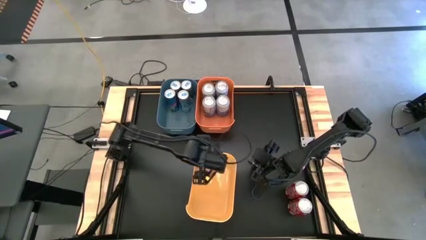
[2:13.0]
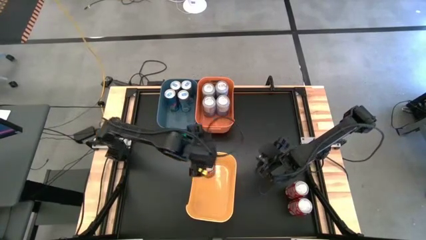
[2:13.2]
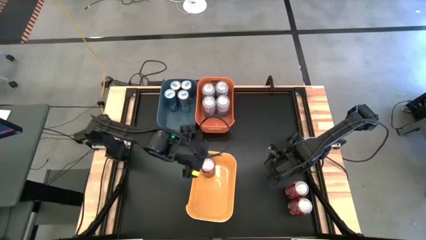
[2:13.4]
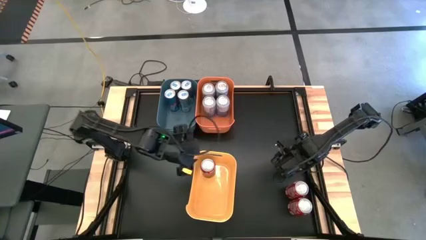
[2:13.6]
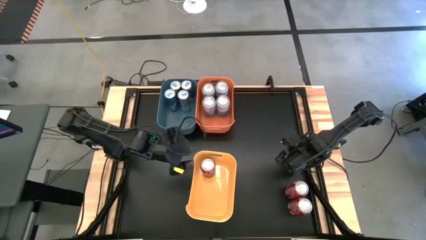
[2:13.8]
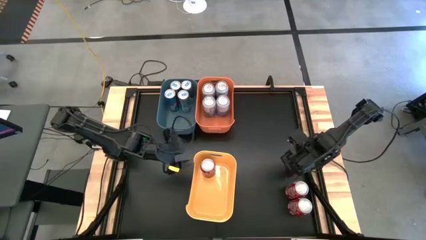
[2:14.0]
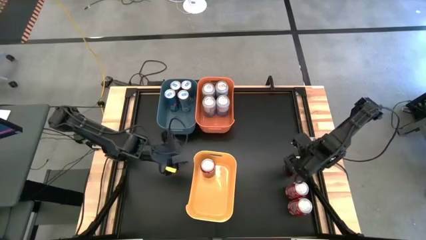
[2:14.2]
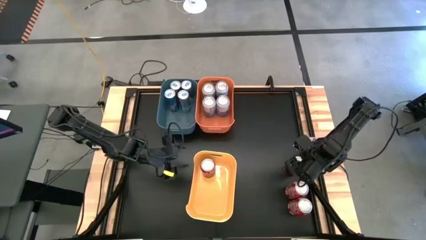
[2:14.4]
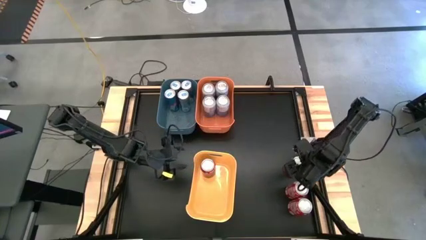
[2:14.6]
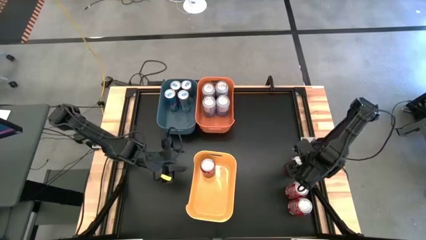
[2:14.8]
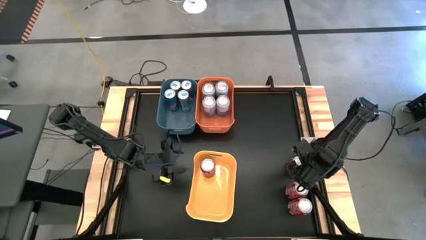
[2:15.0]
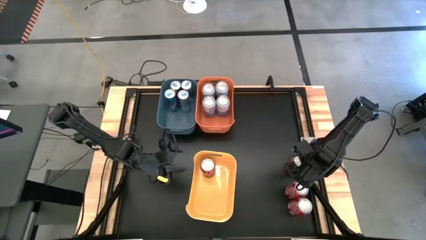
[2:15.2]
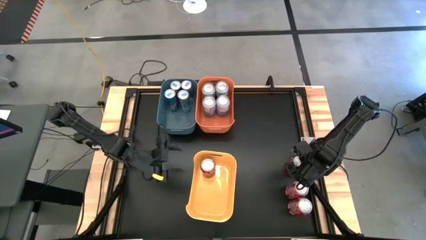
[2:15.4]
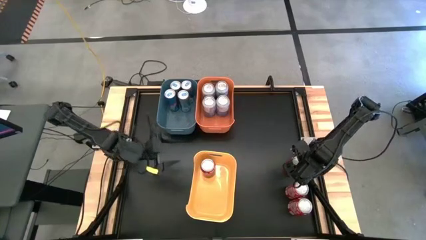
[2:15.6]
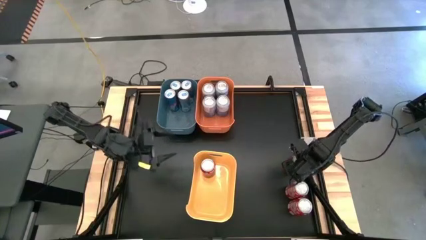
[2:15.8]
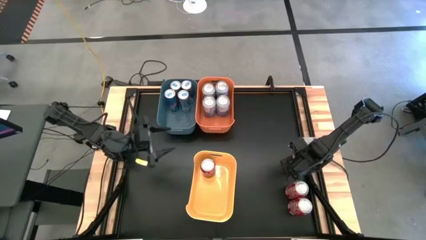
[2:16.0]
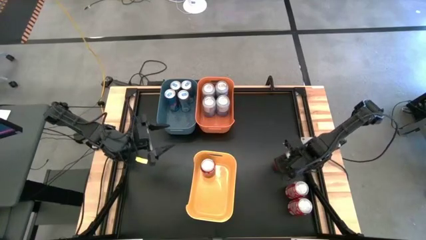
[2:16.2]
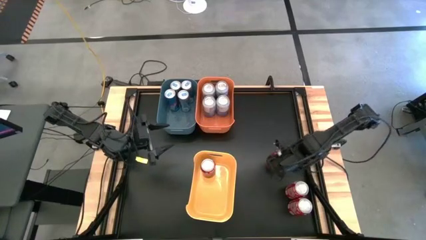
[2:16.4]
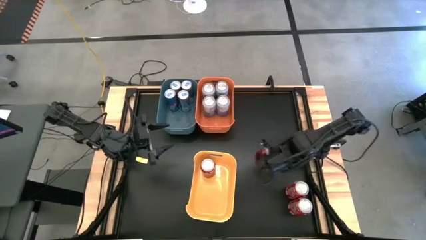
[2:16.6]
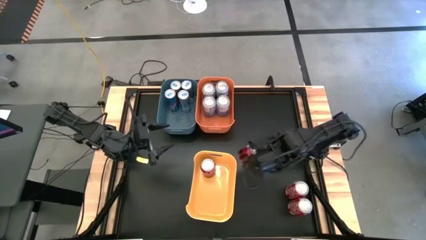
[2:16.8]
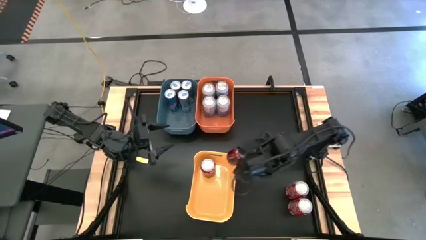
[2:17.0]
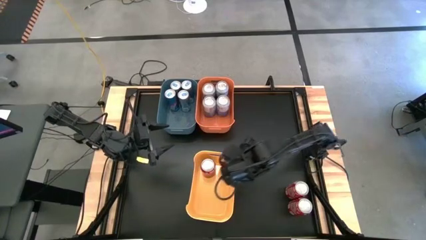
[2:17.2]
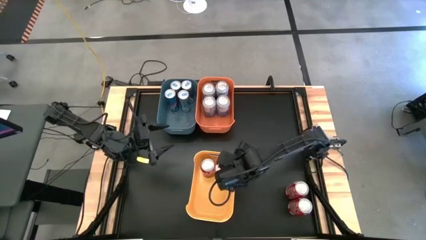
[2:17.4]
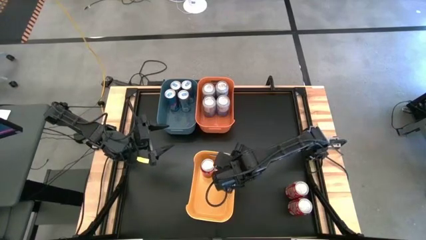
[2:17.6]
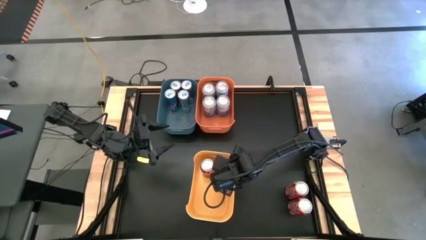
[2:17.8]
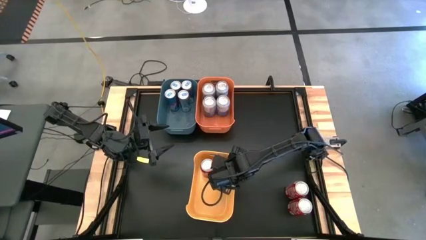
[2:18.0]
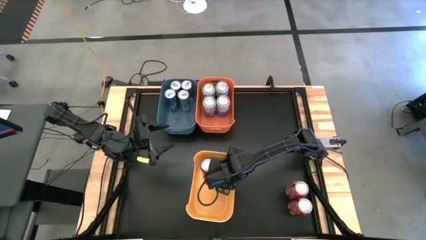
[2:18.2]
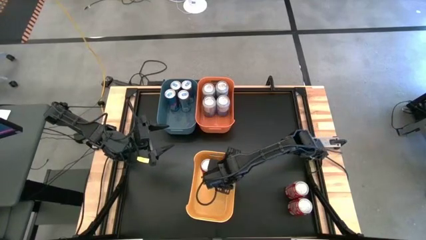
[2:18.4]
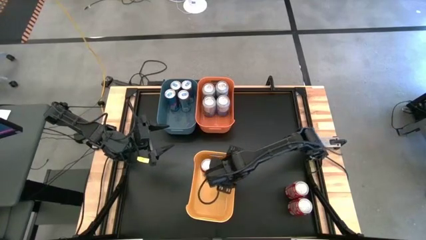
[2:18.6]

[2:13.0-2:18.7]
Task: Sort soda cans
Put the red soda can into the yellow bin

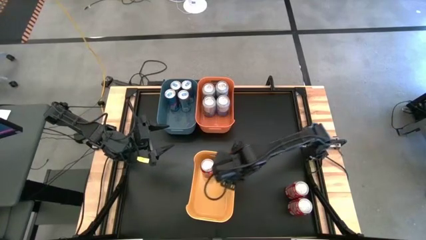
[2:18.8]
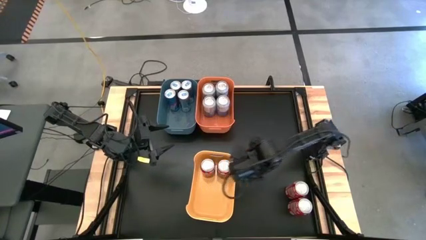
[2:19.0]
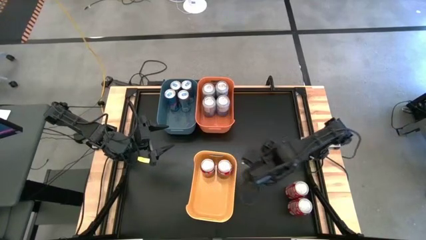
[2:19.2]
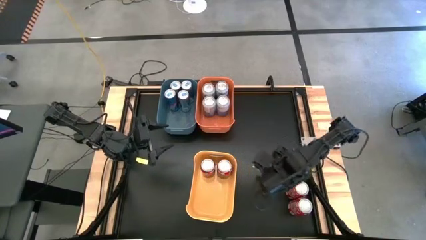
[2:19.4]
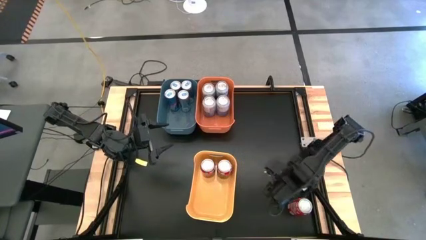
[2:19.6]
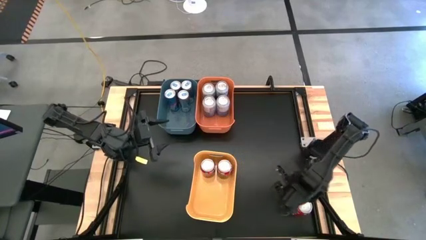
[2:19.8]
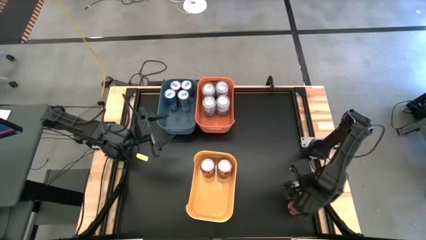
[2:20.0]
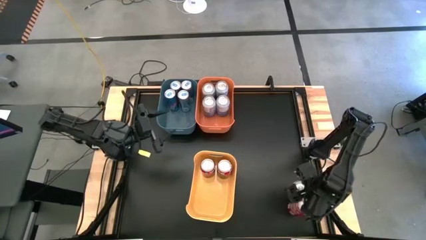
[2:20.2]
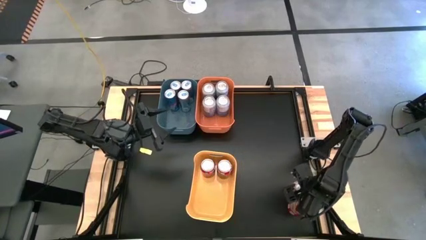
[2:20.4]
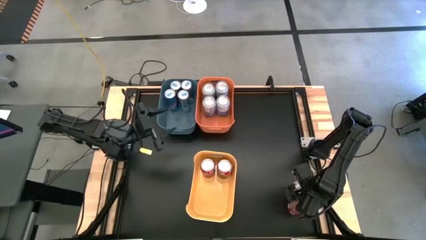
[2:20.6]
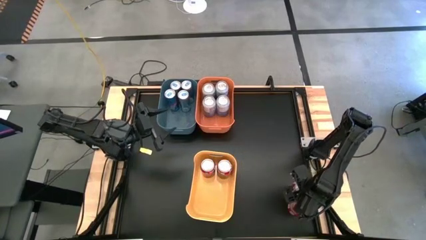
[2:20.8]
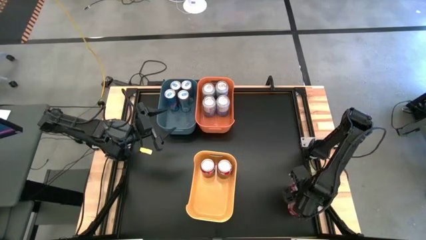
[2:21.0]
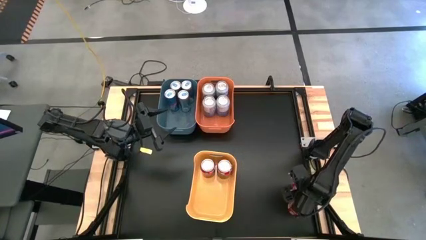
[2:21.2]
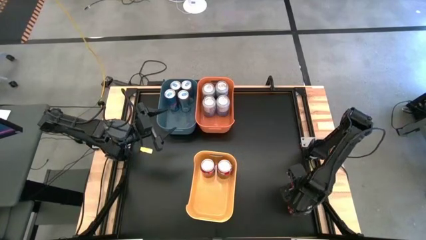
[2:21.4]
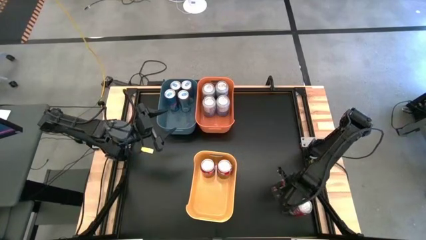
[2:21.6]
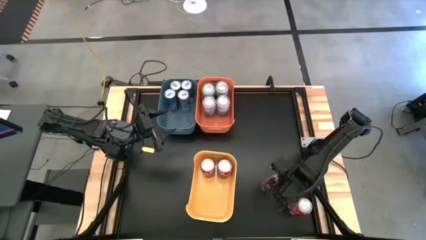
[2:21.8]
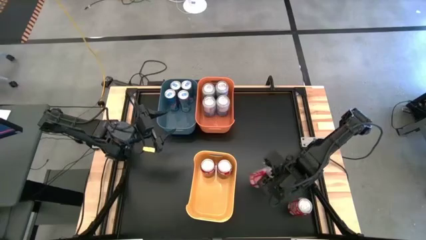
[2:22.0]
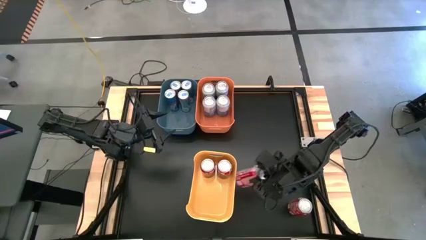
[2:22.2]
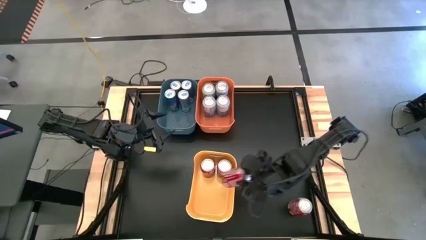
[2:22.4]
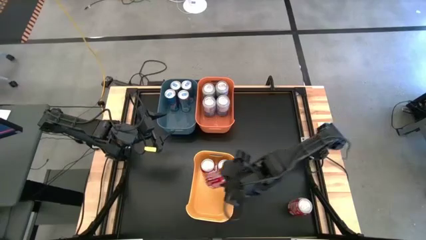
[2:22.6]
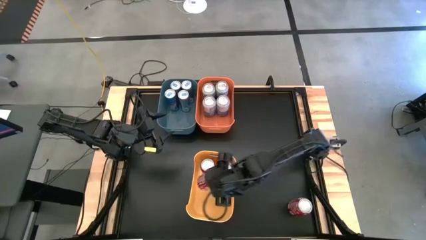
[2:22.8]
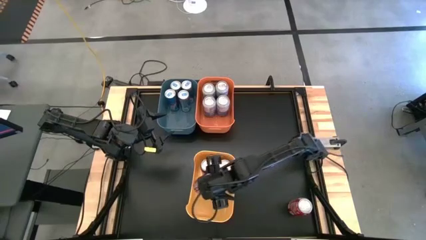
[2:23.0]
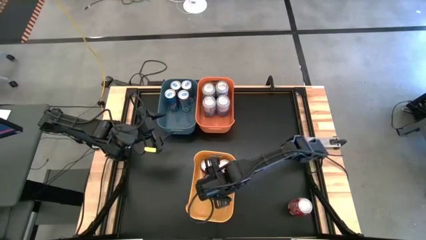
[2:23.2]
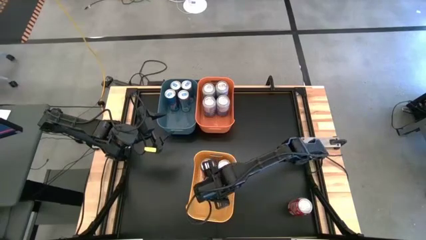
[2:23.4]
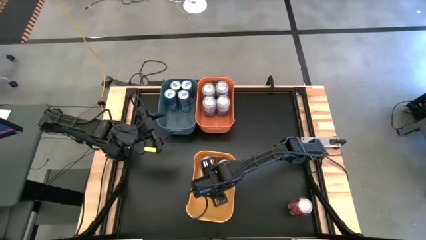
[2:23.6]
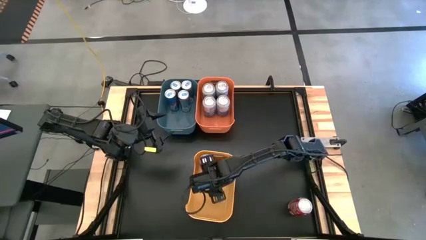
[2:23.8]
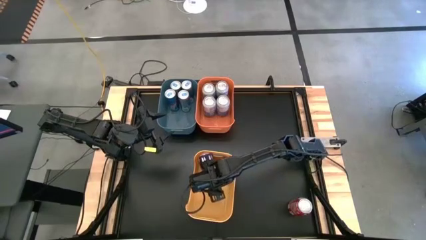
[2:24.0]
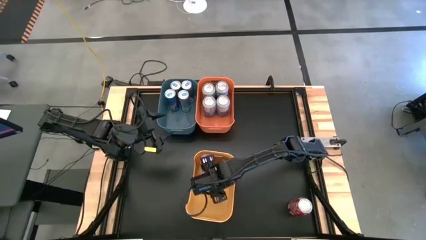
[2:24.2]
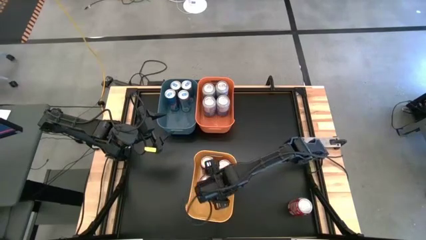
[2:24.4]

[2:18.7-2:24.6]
Put the red soda can into the yellow bin

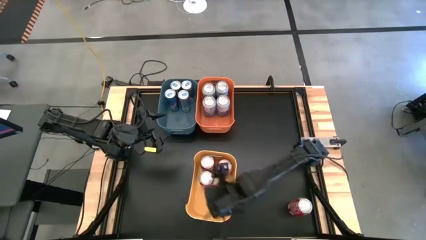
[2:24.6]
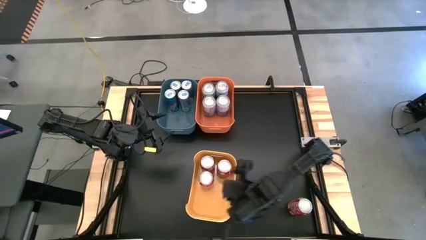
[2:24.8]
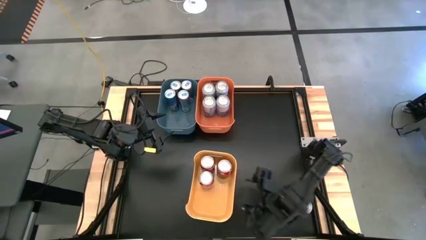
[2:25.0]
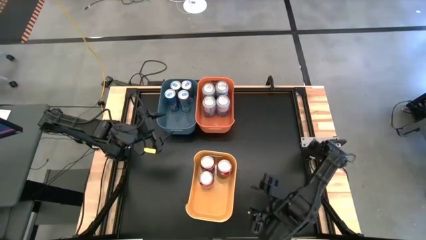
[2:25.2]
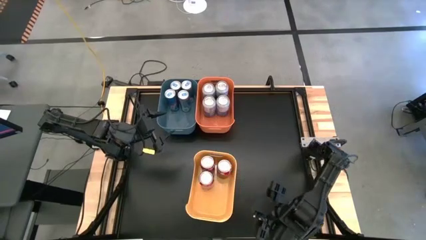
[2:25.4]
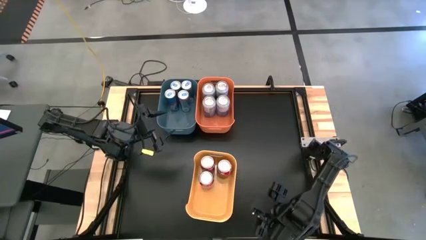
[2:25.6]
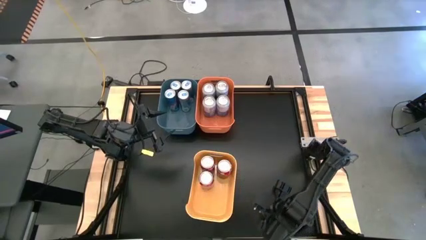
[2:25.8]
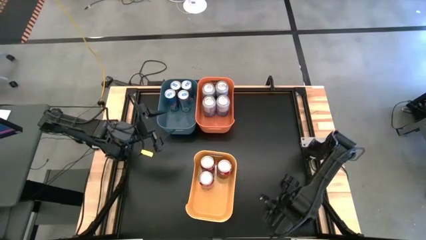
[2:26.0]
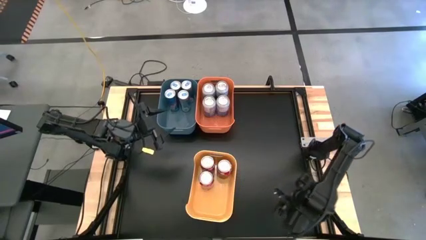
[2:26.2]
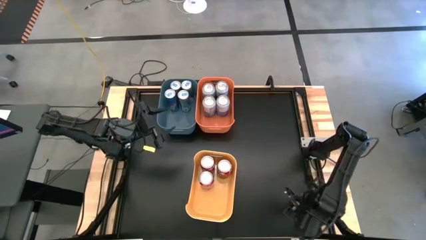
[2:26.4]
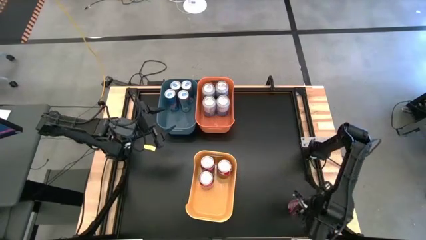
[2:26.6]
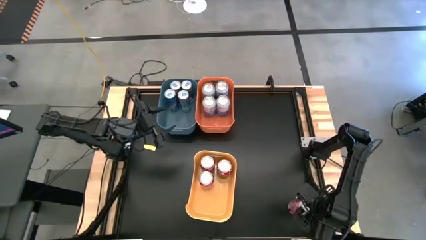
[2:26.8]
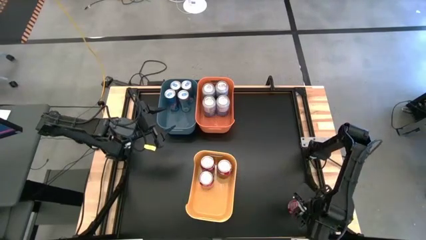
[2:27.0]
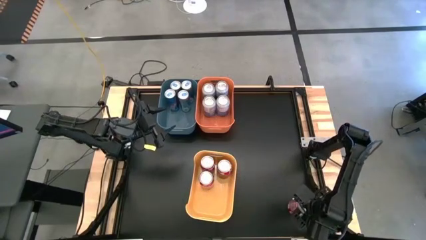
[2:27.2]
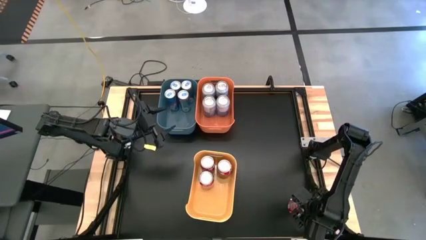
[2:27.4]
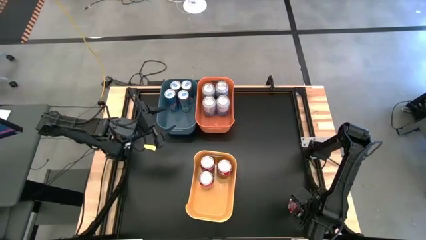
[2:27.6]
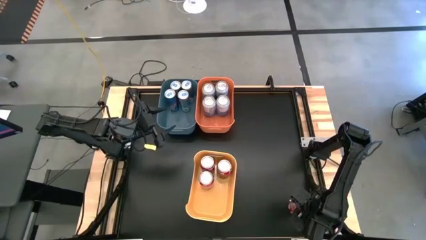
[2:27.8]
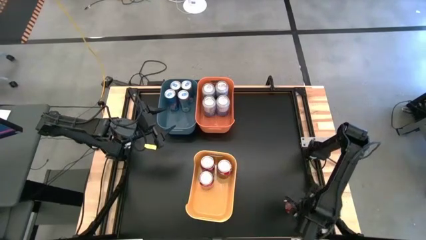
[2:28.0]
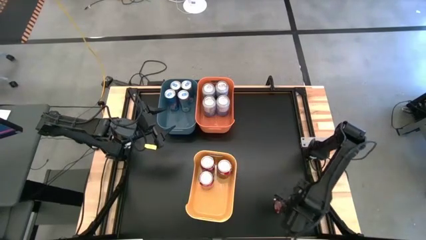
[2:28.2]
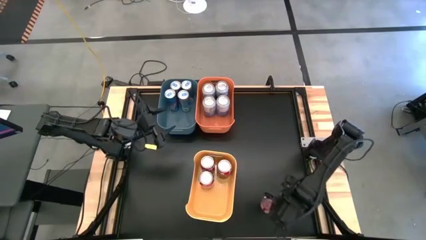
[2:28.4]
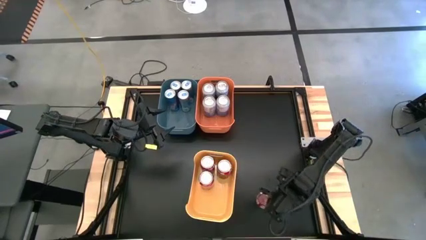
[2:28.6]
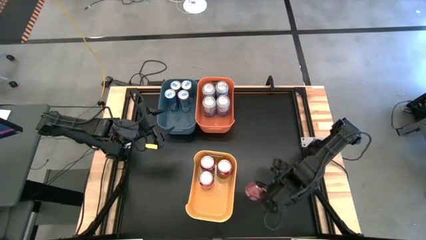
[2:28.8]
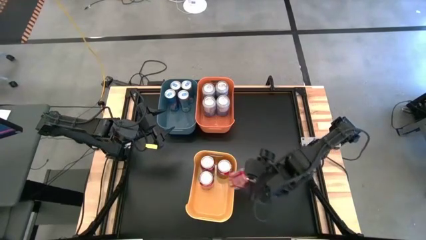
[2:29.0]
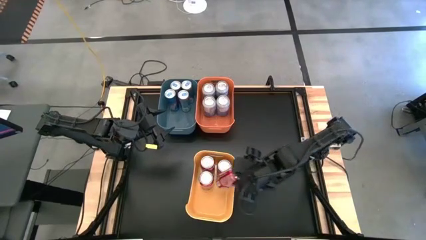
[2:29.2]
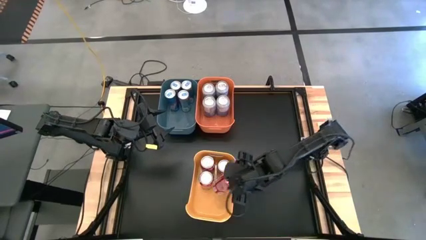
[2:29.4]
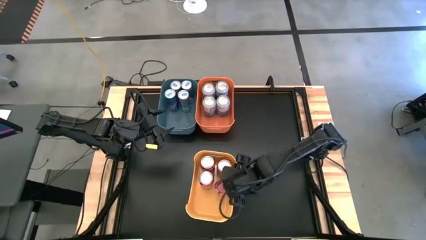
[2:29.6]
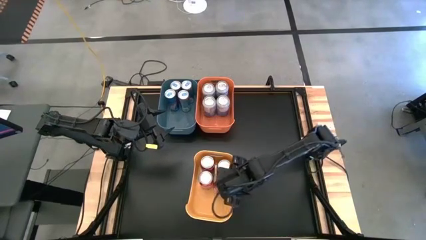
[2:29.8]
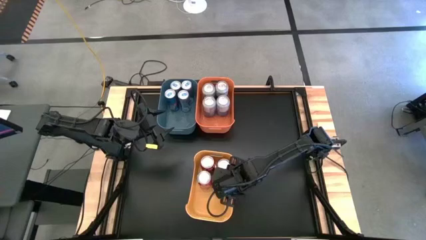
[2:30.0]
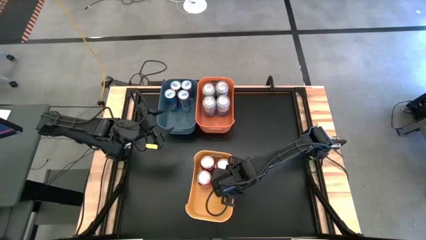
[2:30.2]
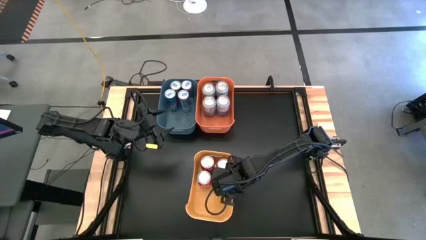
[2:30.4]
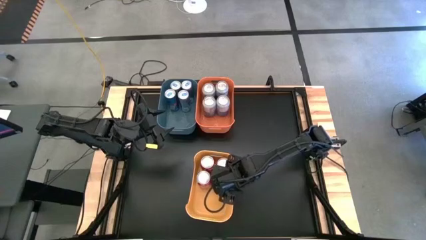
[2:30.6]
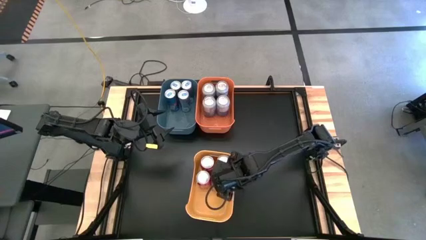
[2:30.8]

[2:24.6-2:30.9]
Put the red soda can into the yellow bin
